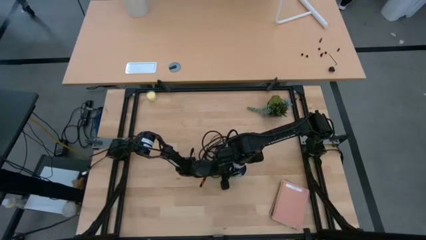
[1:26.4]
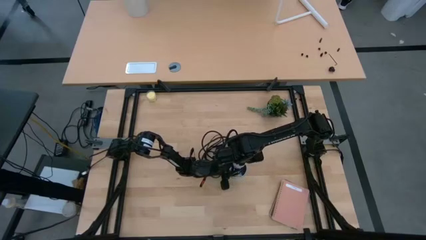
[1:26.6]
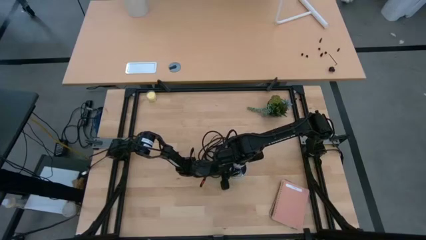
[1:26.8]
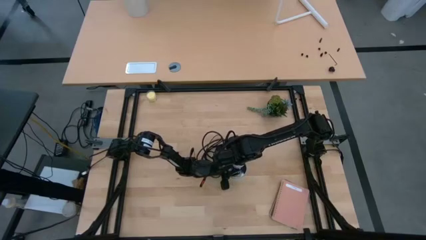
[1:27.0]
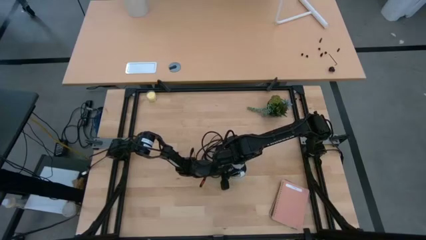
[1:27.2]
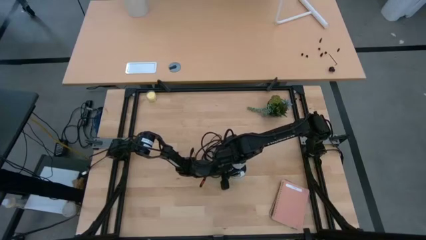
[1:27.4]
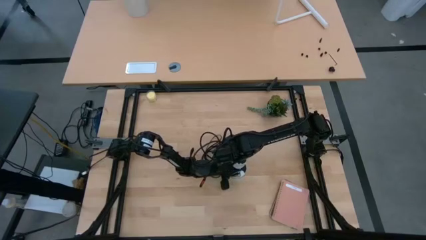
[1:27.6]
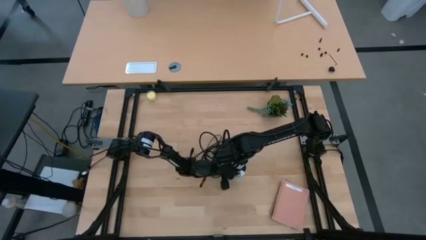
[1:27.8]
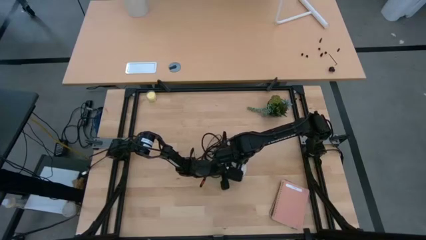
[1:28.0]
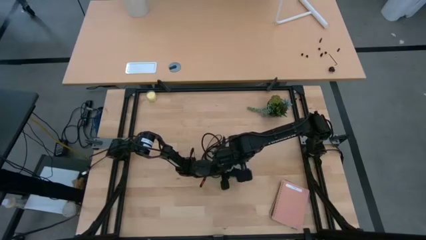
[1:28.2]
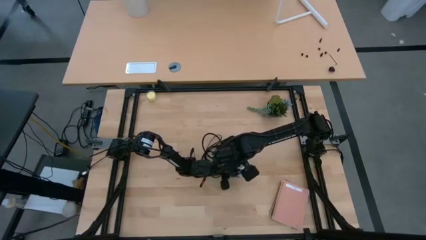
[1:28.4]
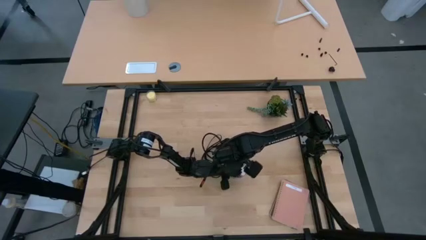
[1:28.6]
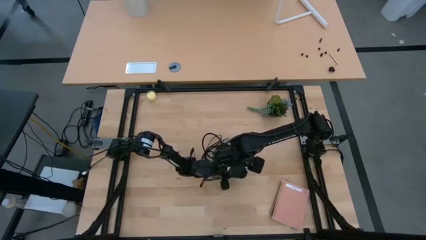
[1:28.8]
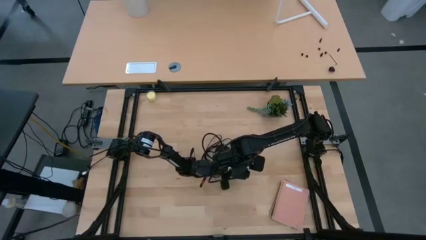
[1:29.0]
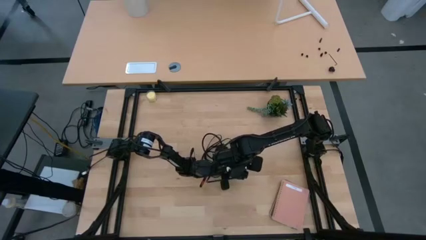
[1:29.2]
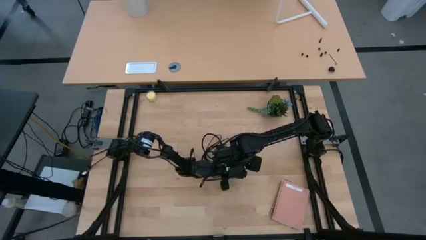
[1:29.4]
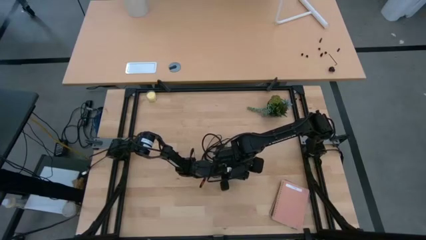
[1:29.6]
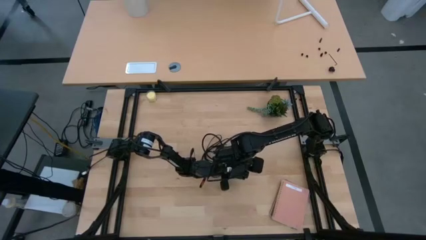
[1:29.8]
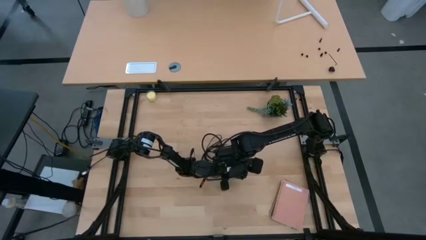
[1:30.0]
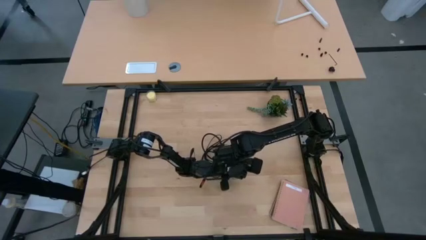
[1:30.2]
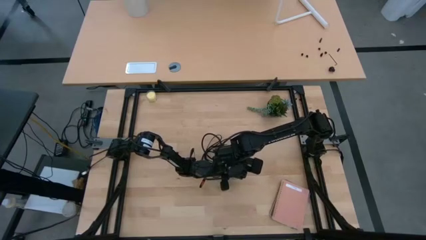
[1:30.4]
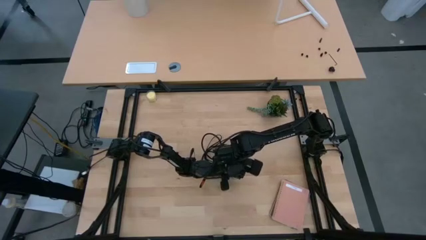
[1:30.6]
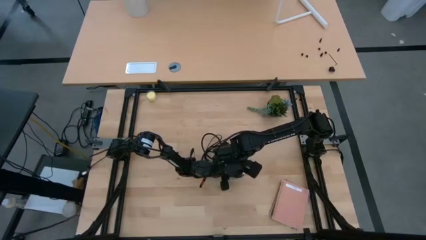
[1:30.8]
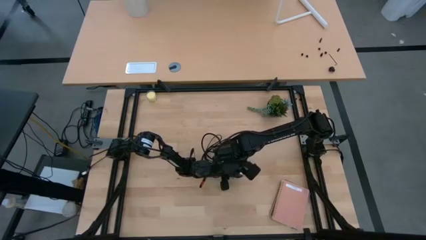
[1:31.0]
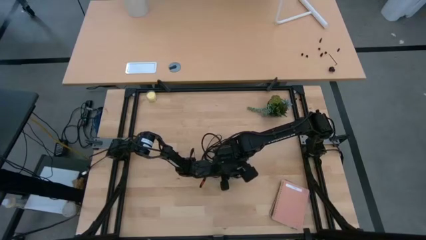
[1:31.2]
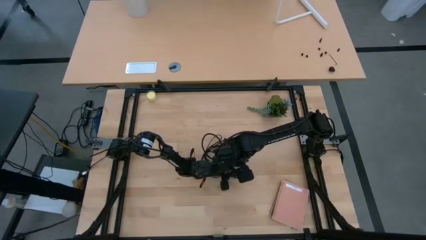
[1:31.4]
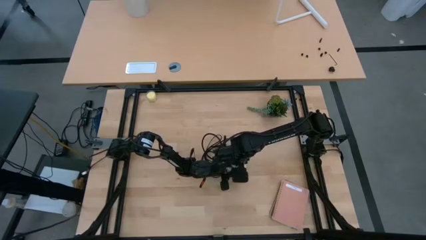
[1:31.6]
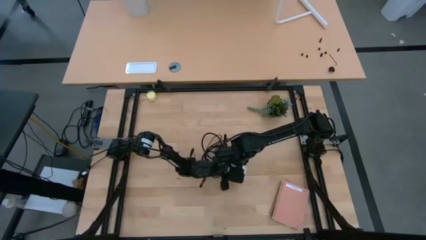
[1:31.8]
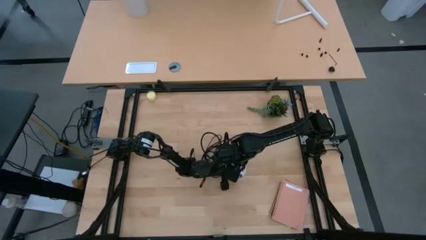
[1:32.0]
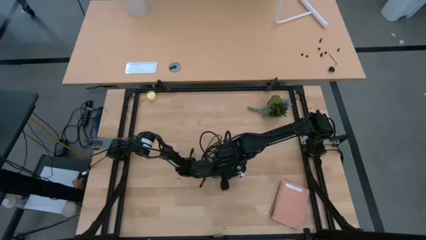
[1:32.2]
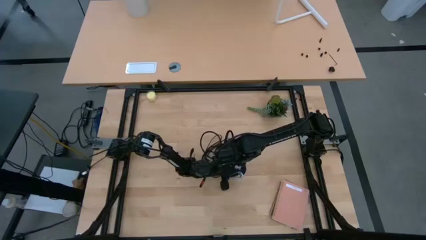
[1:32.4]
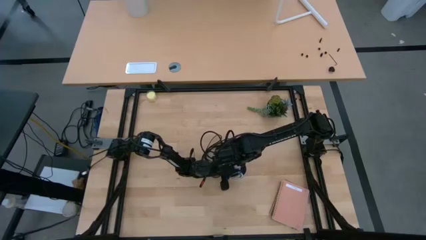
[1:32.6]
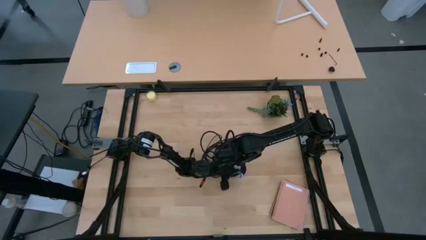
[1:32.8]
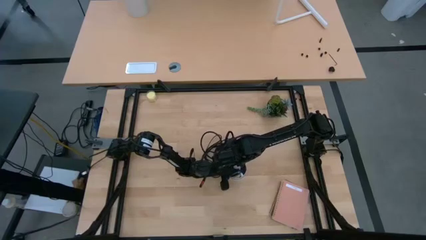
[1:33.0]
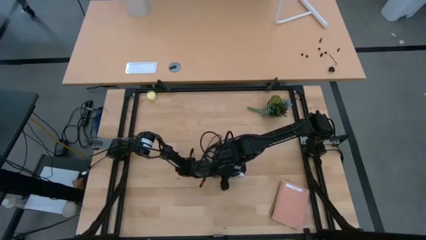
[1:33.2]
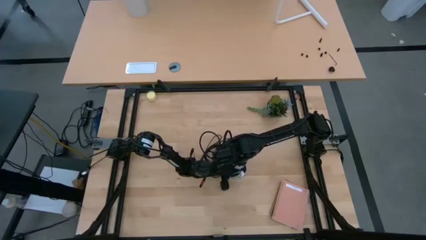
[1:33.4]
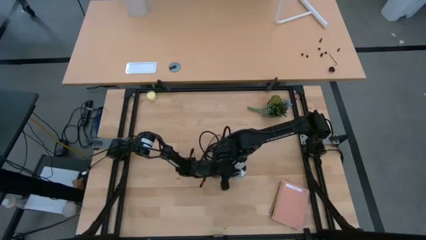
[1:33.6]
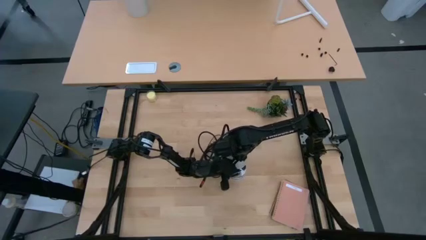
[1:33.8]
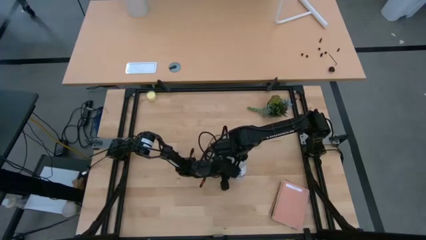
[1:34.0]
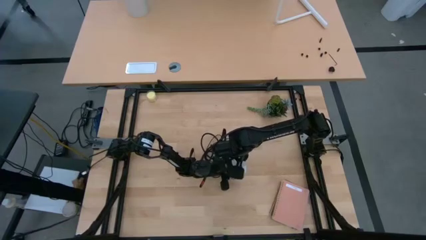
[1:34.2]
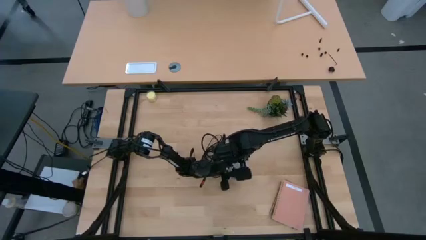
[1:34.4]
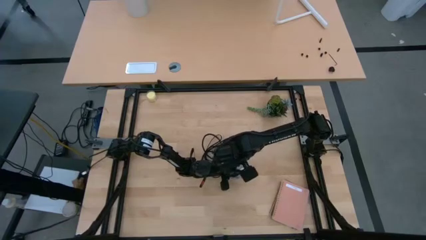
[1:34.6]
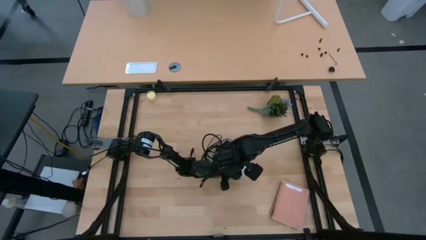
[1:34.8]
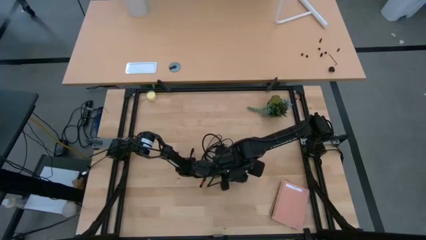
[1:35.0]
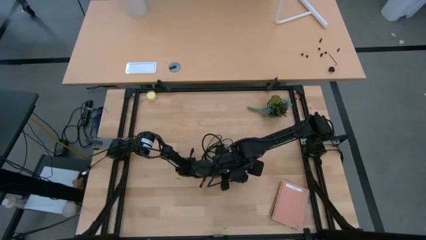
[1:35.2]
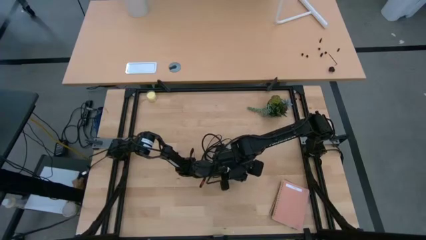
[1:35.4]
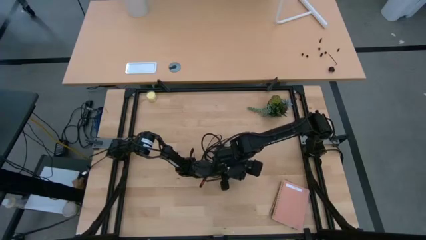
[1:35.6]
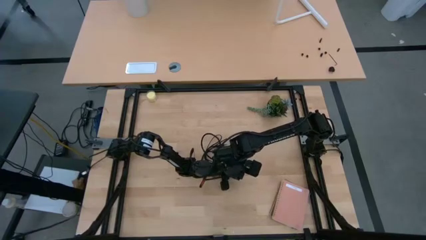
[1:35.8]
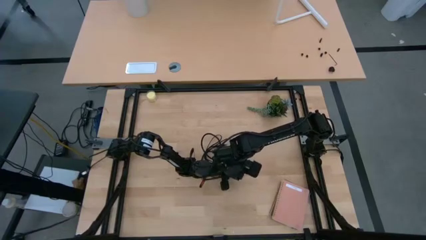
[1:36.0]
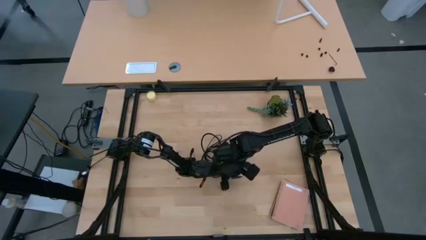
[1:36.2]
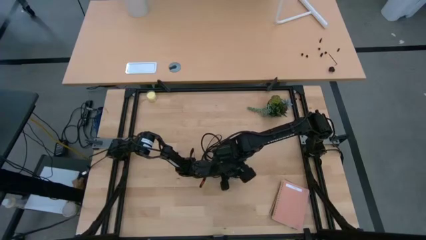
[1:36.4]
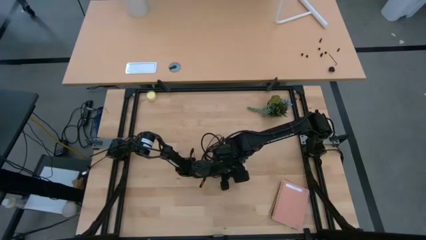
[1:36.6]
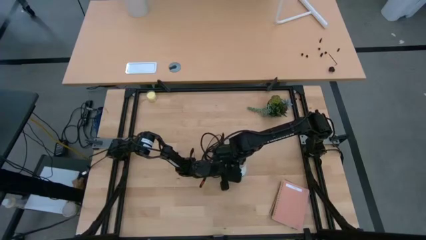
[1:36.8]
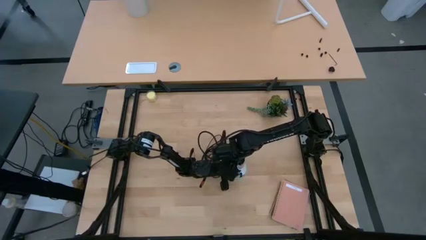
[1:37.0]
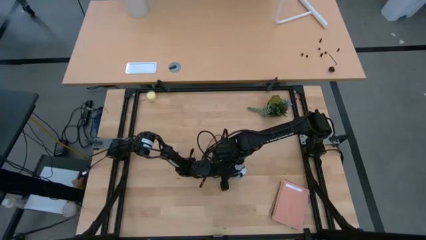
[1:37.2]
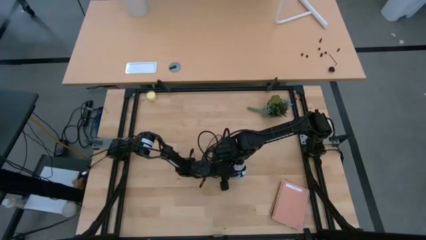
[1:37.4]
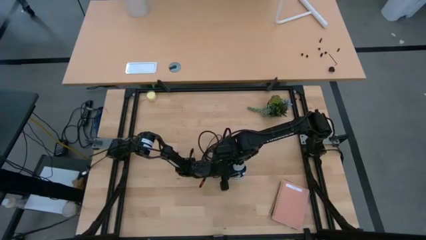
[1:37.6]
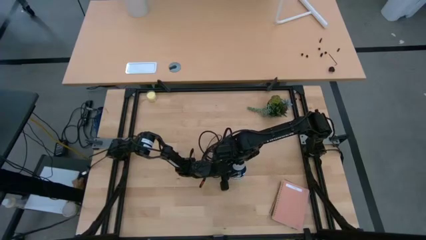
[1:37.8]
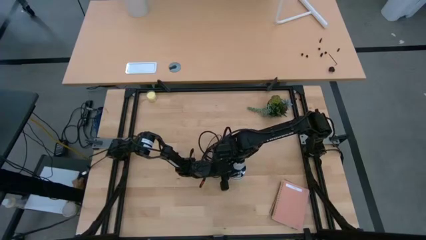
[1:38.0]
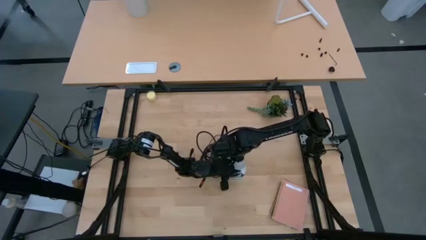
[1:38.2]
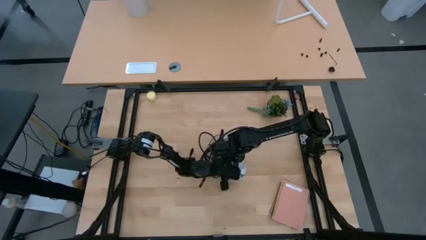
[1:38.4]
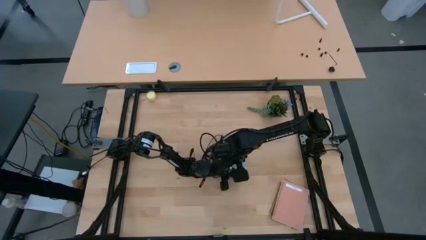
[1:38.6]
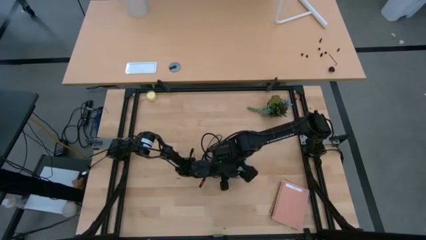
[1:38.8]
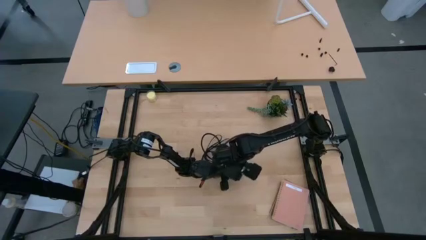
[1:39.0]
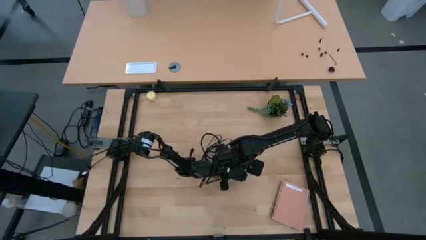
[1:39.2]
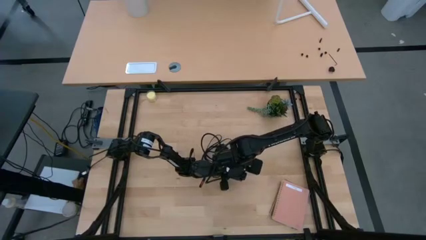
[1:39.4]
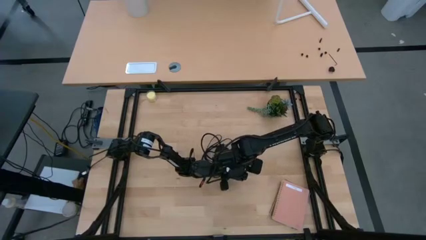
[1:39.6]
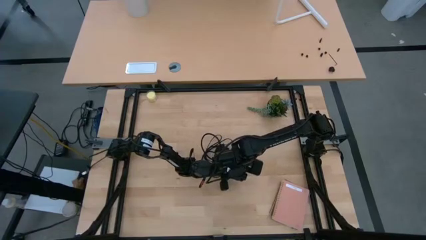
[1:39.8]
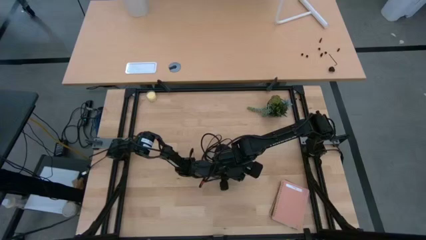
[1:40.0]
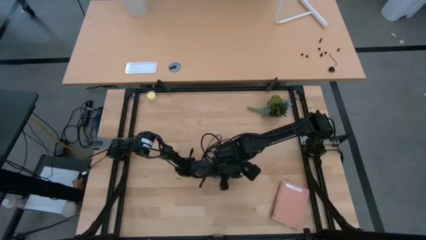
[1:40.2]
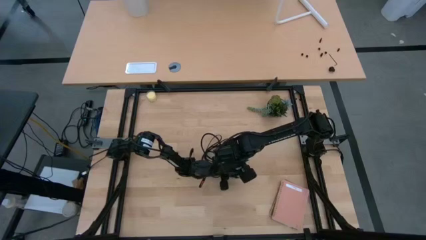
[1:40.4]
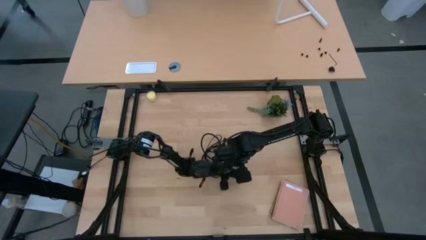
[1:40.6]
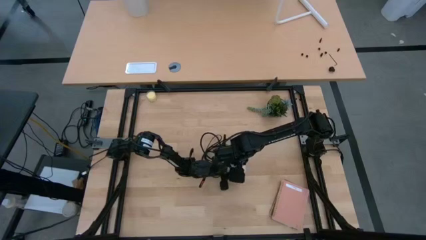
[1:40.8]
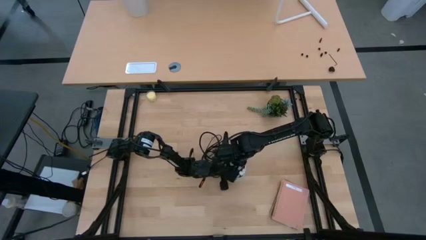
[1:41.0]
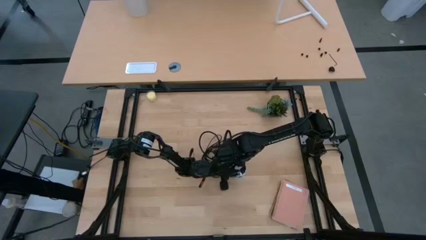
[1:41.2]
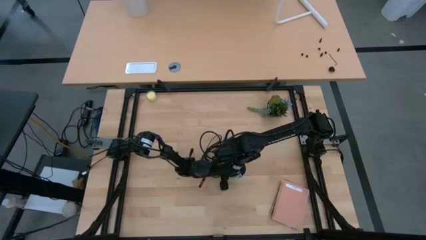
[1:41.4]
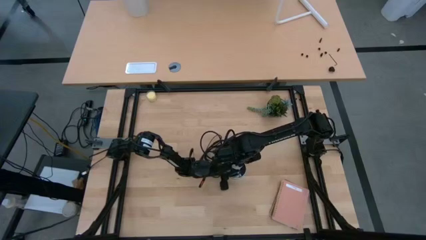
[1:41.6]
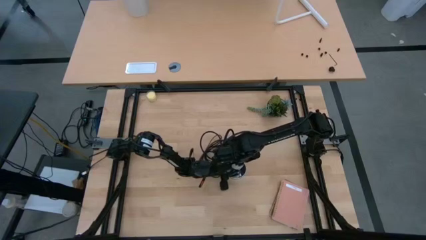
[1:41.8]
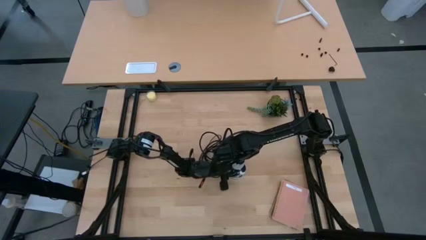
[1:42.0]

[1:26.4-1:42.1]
Task: Screw lightbulb
Insert the light bulb into the lamp
